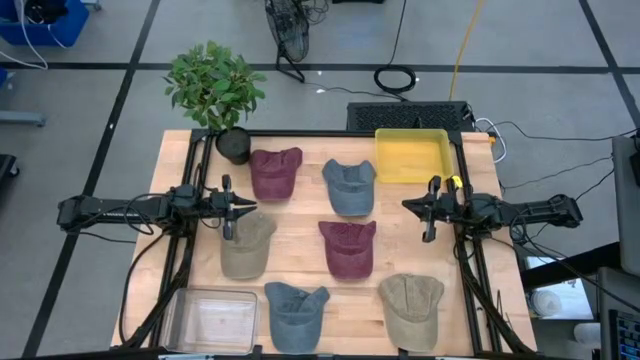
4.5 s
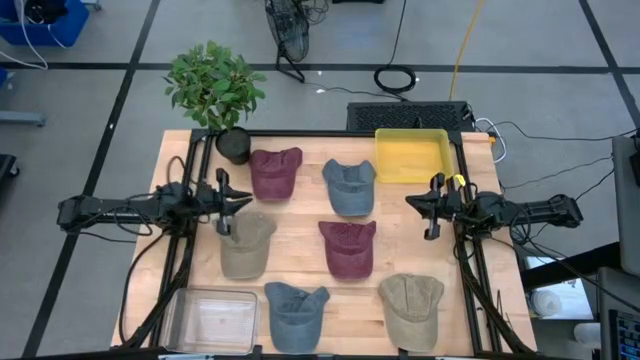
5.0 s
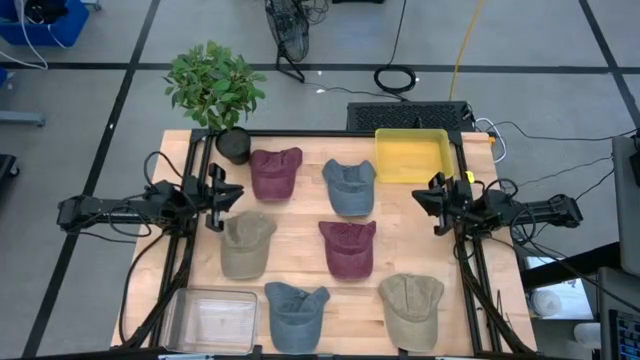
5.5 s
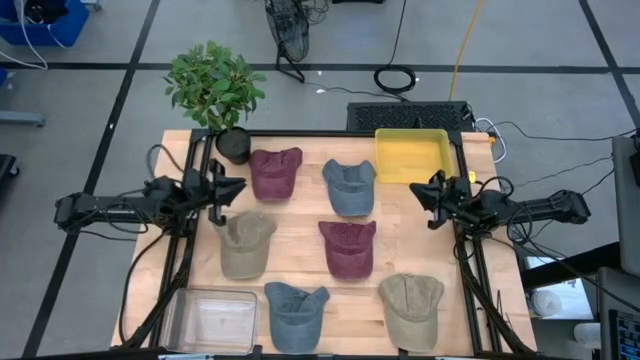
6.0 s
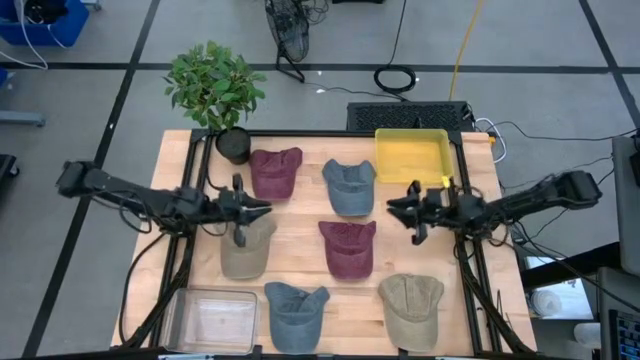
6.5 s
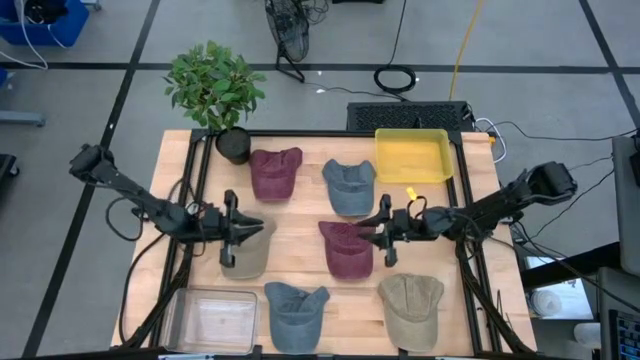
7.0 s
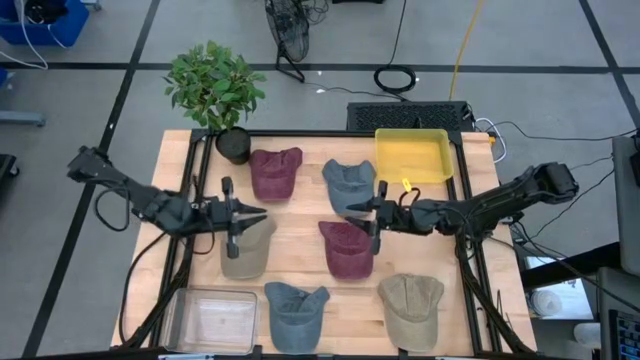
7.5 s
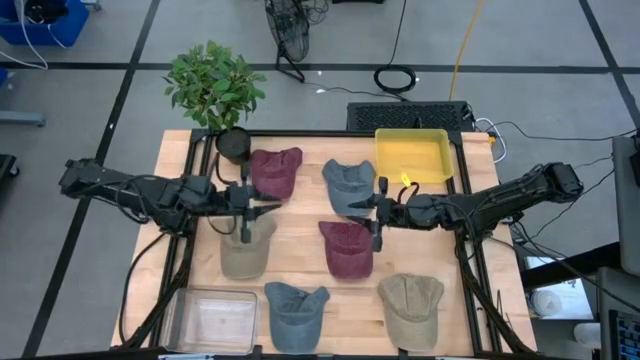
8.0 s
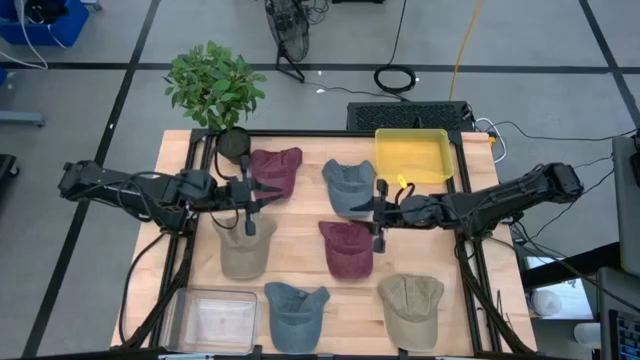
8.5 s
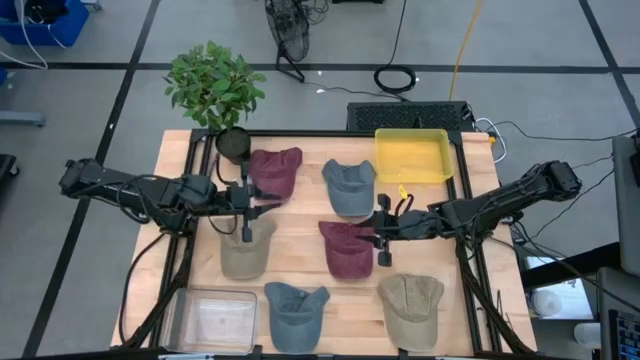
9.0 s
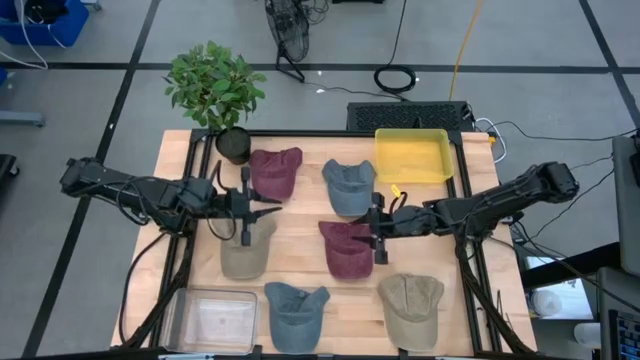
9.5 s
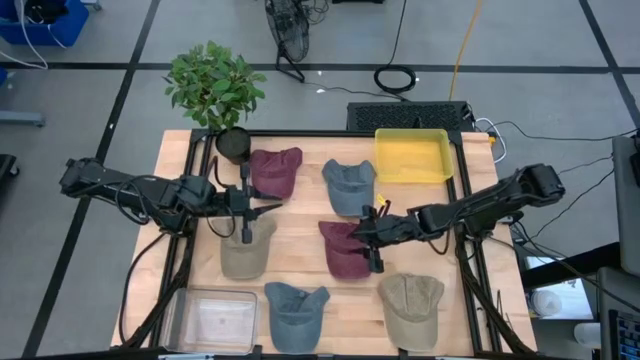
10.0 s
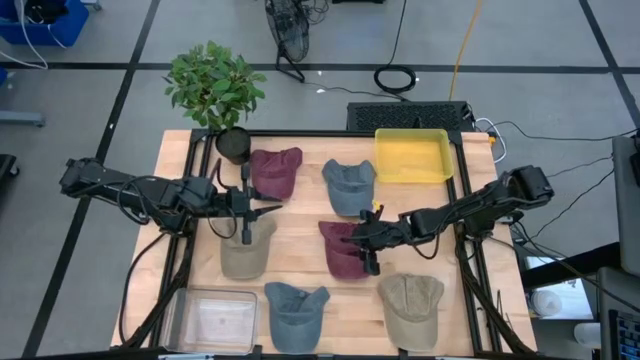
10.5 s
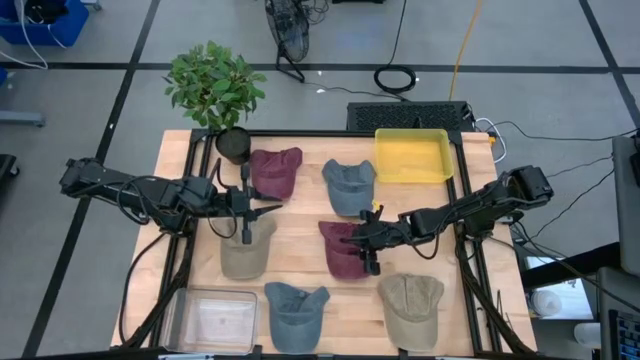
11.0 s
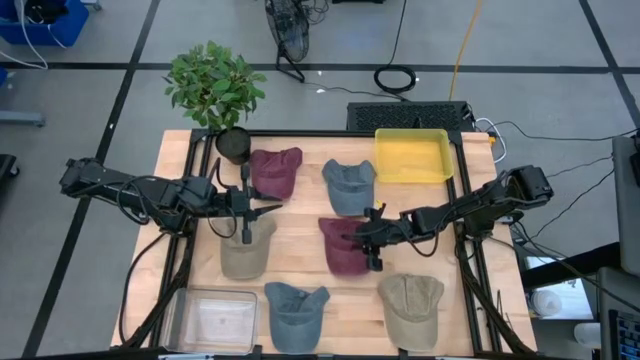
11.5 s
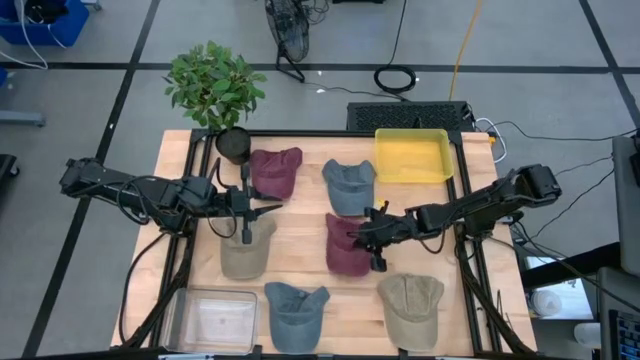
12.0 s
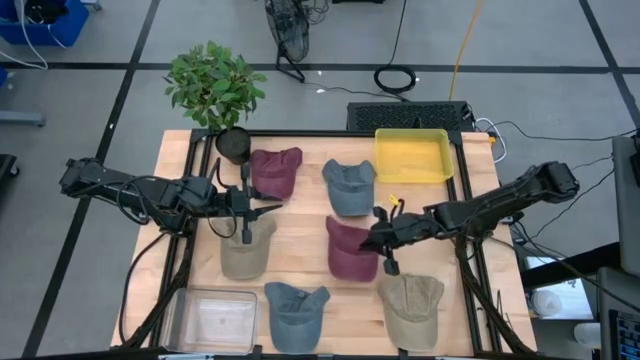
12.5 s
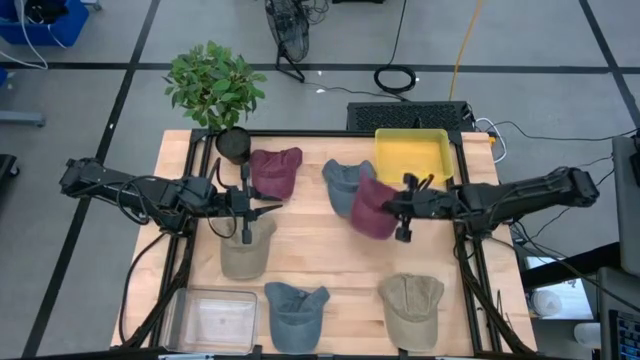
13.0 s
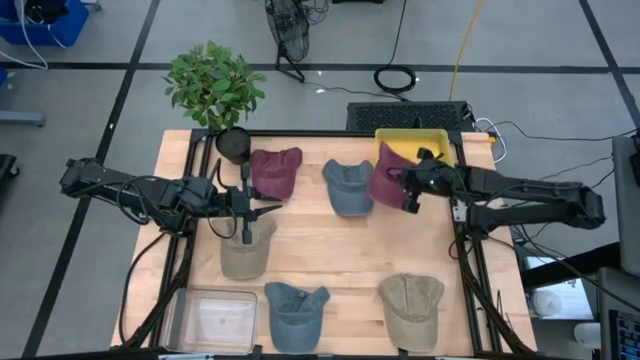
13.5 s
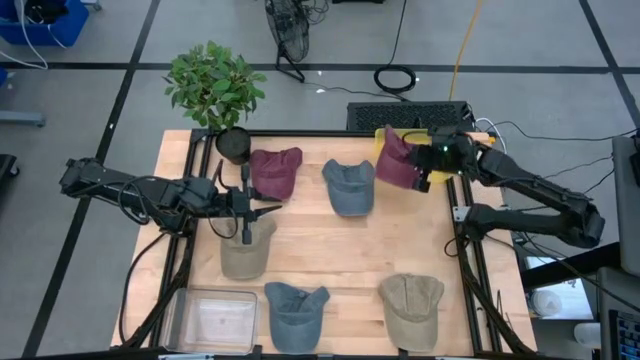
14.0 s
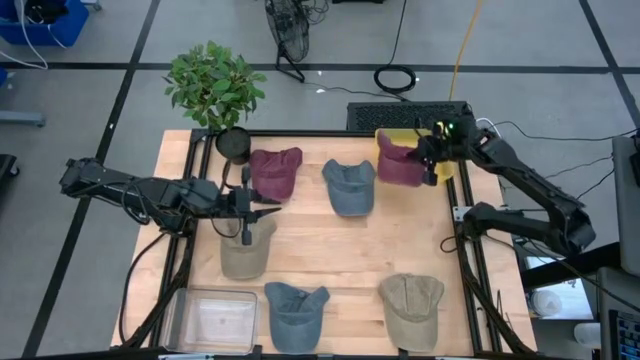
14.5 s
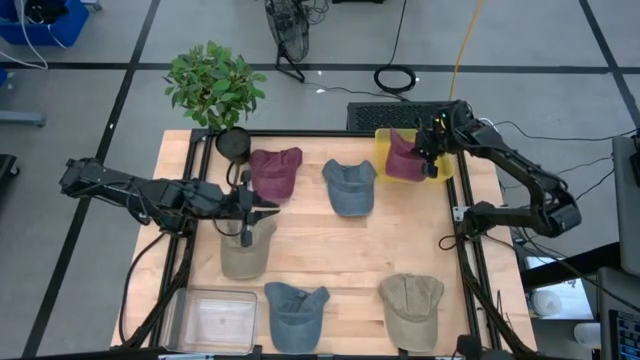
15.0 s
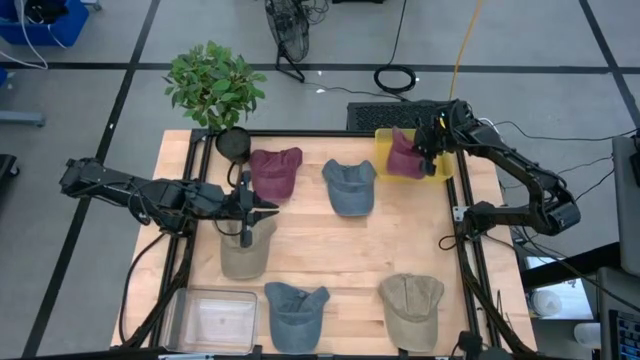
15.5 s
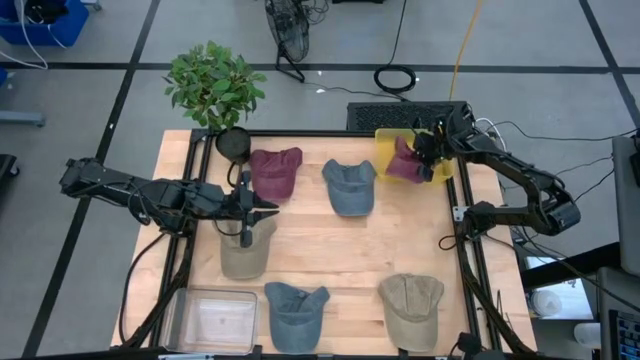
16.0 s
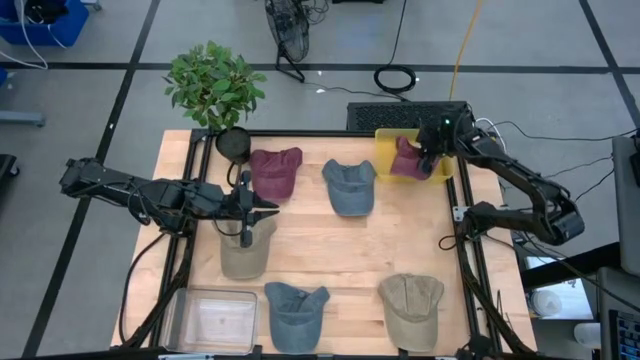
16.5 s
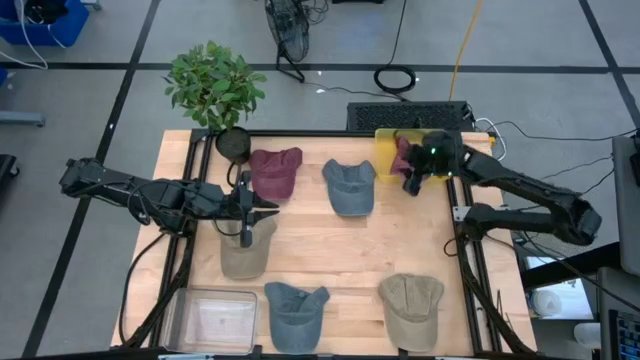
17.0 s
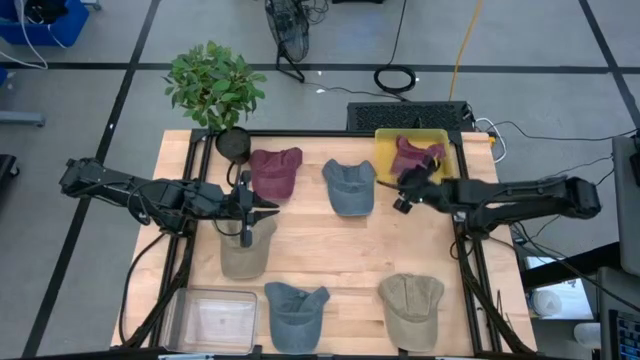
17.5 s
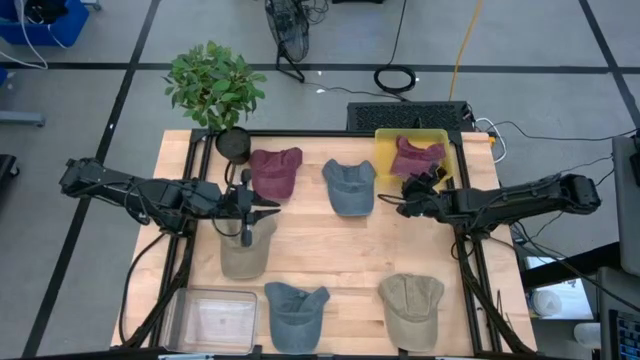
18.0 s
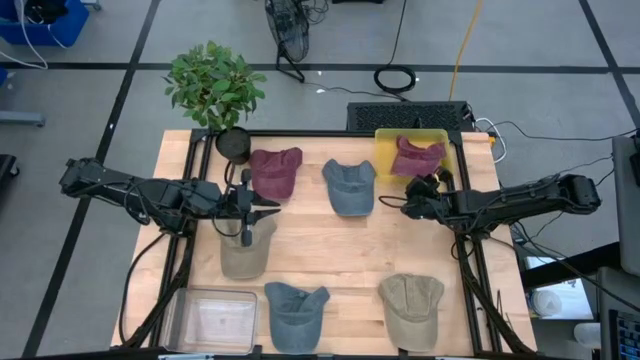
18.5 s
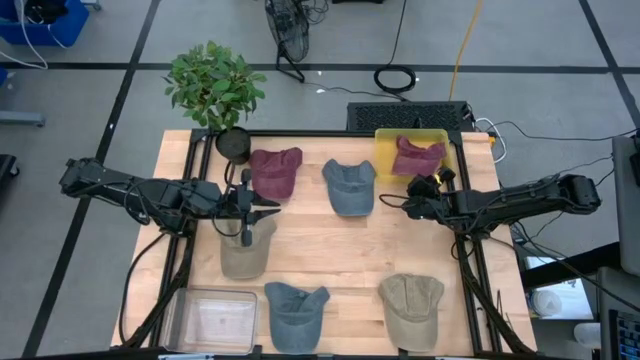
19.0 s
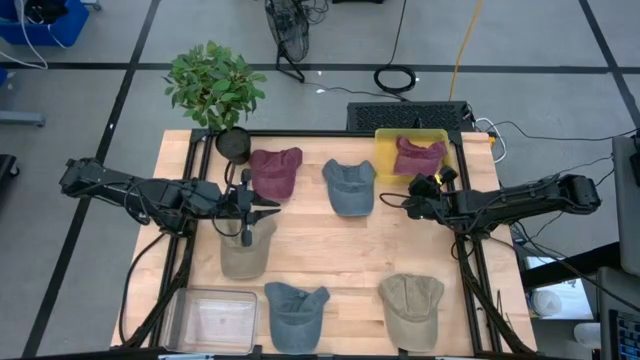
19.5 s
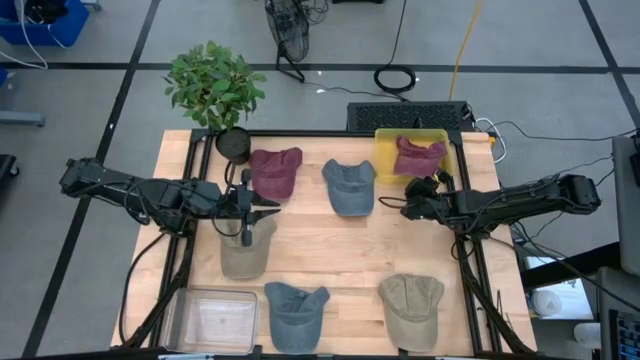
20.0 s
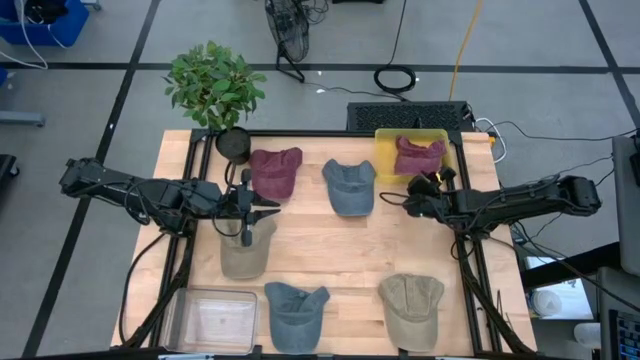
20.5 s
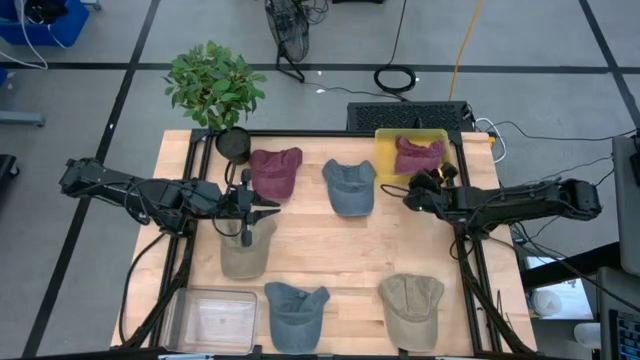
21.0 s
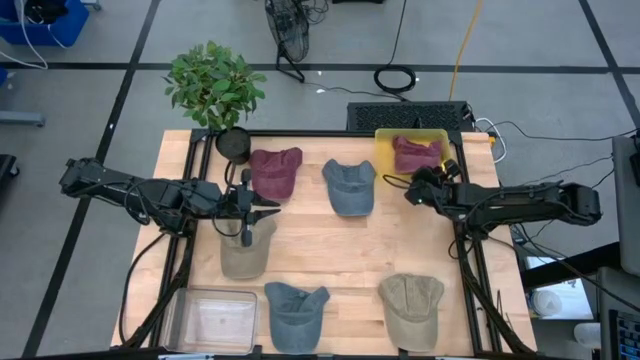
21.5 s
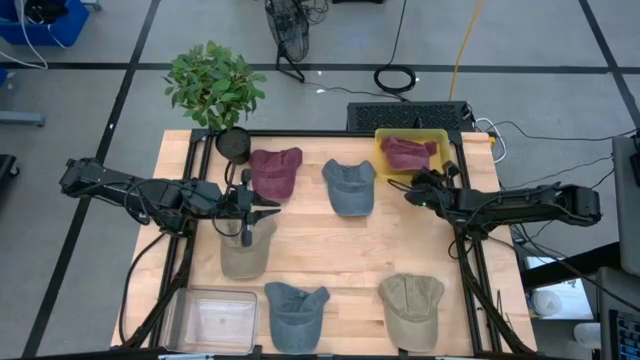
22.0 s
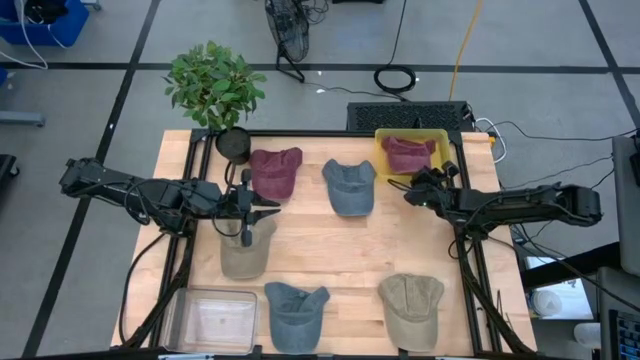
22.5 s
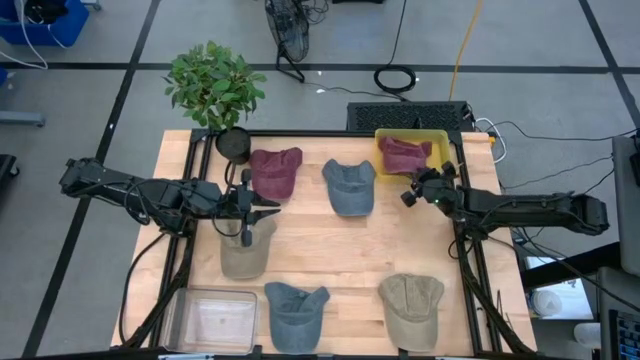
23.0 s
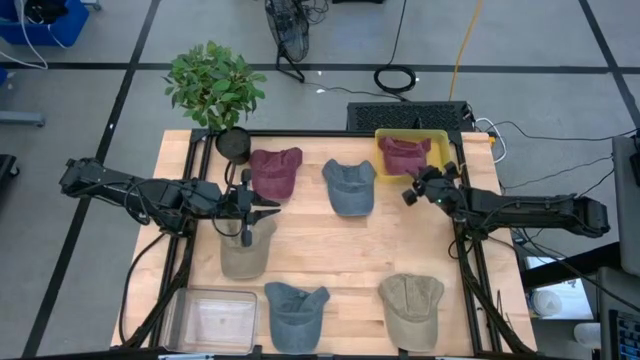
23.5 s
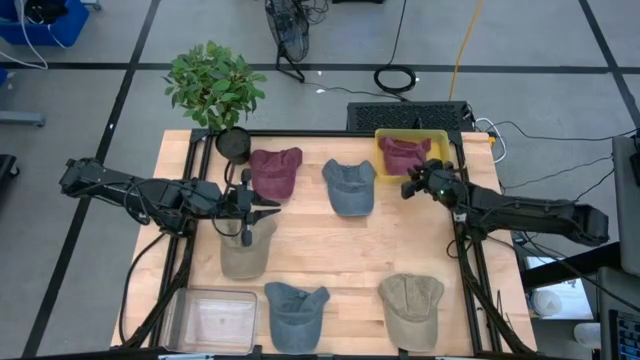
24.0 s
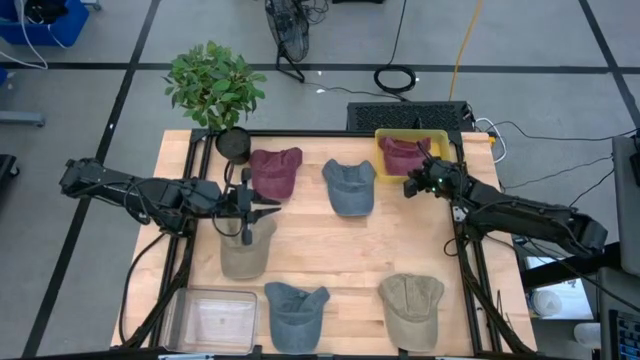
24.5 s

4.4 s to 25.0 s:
Task: Pick & Place hat
Put the bottom red cap into the yellow bin
